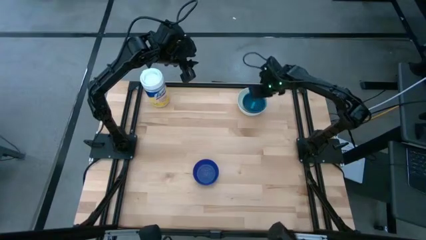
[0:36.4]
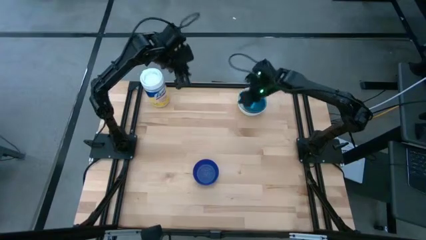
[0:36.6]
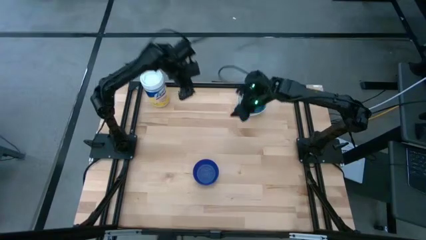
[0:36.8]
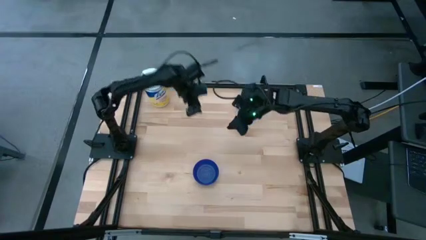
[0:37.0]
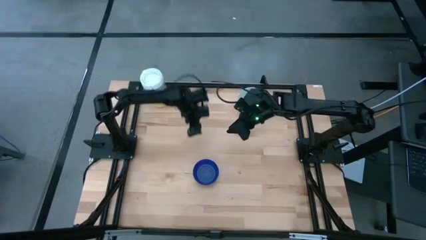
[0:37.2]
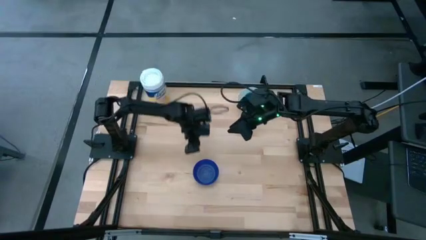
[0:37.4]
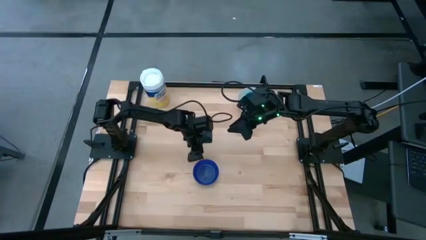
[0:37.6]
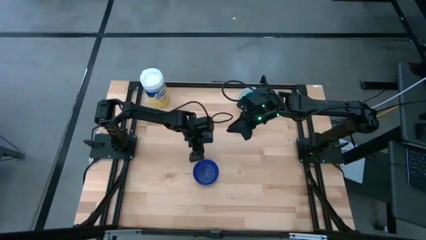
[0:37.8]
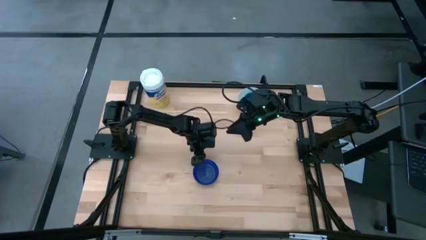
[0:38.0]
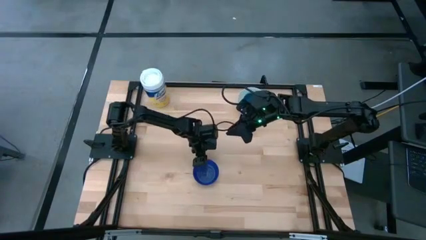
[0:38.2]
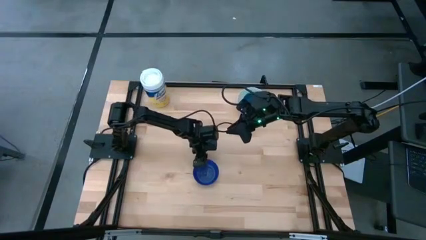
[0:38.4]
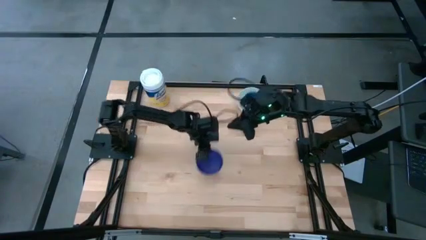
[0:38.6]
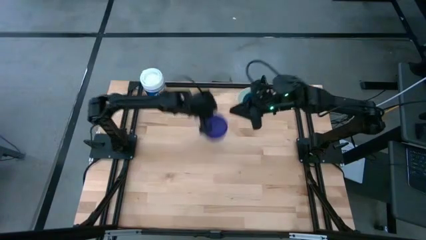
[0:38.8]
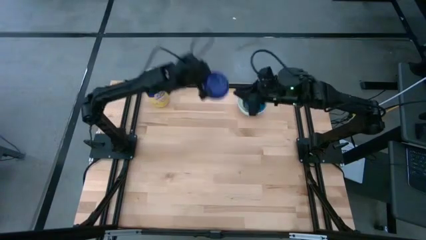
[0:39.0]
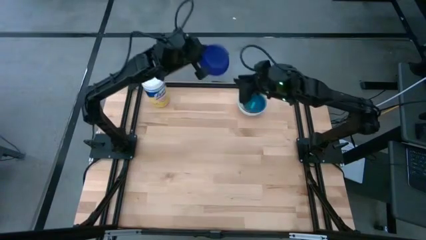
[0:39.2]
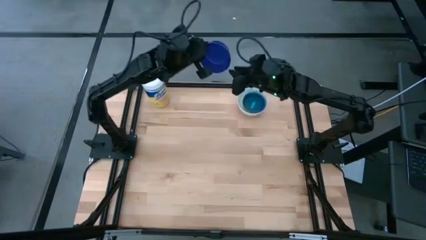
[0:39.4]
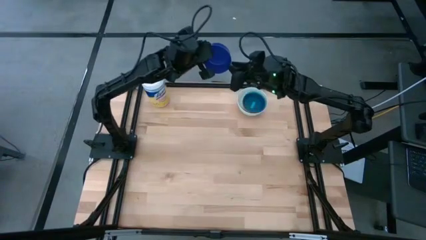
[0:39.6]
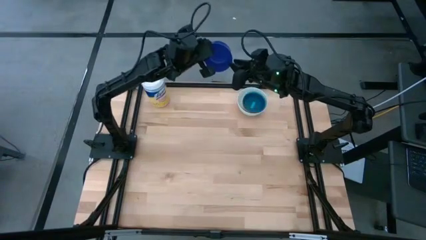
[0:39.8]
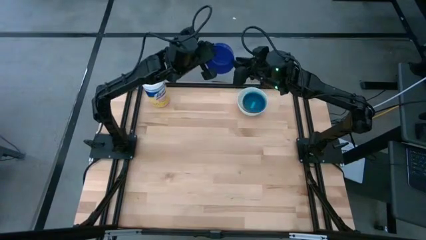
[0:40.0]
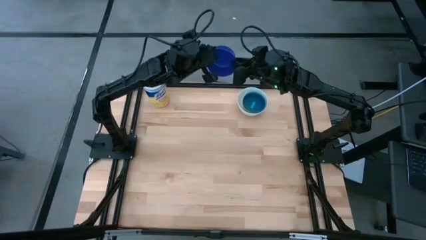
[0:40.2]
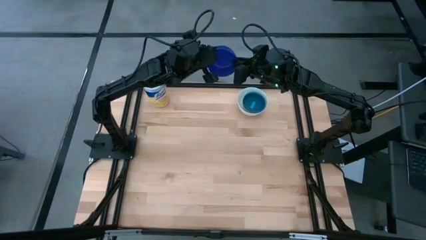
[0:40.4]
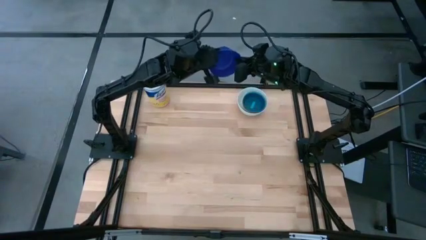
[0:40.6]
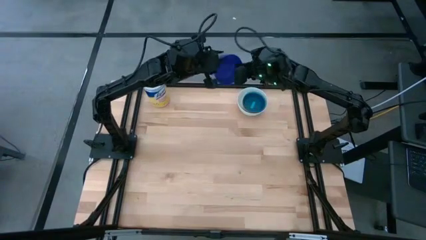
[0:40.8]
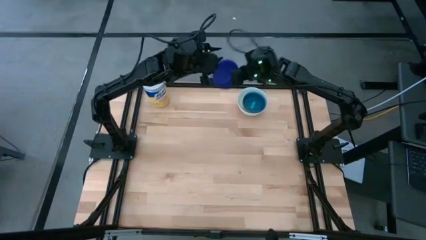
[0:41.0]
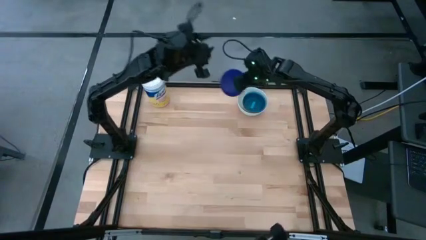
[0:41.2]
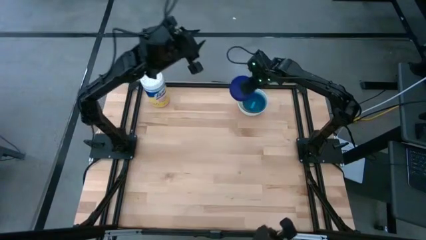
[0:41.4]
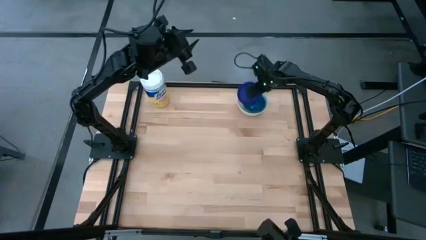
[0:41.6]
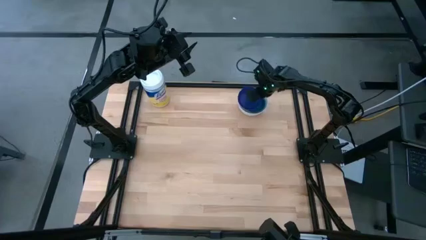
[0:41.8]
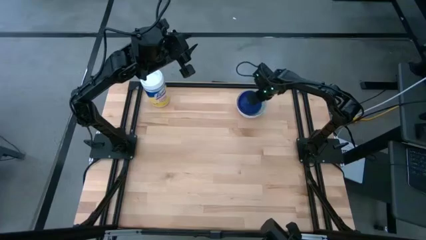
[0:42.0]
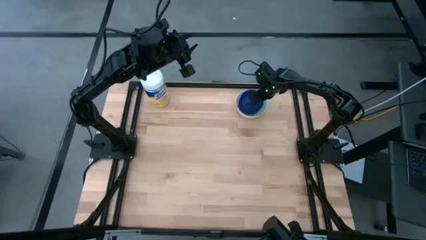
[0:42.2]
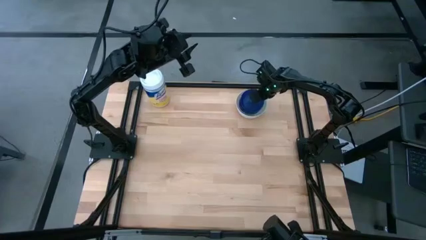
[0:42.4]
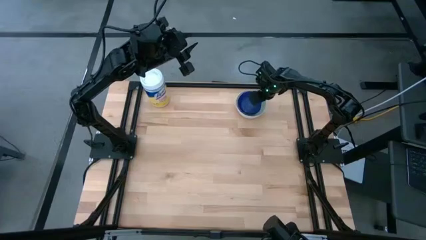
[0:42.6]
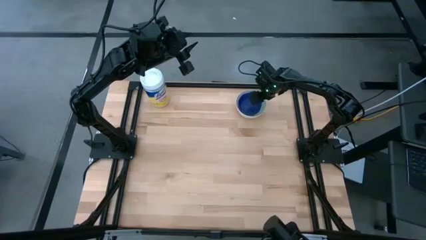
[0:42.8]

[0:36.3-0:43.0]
Stack the blue bowl on the light blue bowl

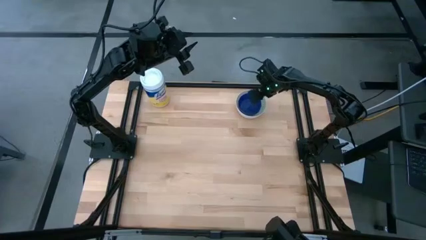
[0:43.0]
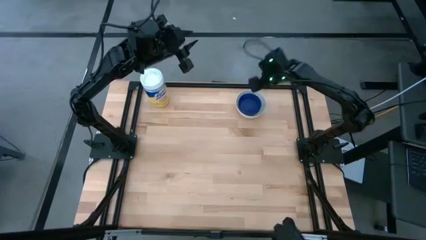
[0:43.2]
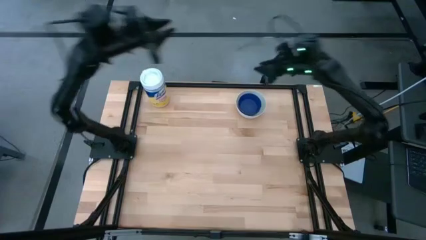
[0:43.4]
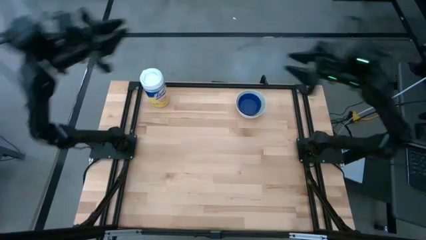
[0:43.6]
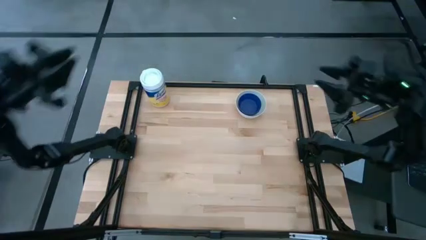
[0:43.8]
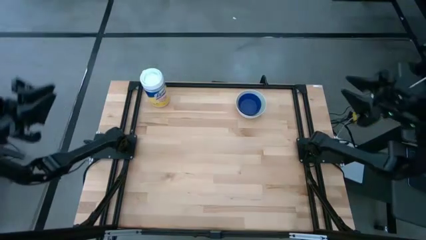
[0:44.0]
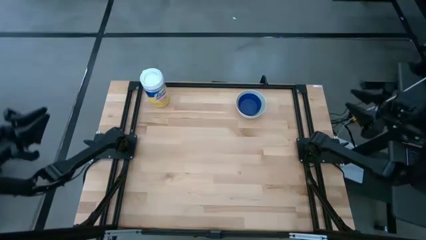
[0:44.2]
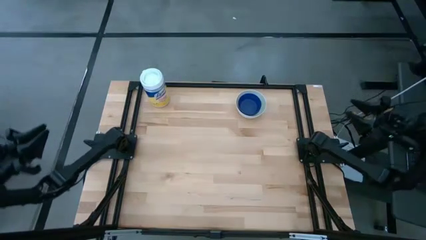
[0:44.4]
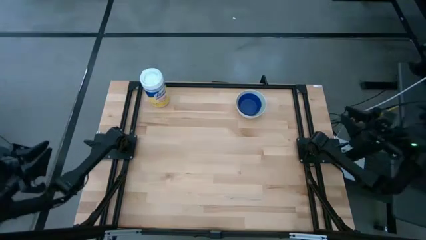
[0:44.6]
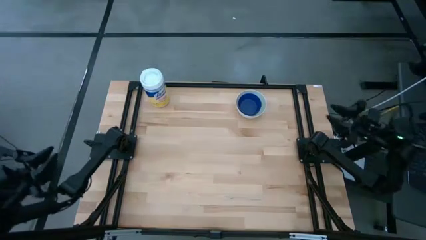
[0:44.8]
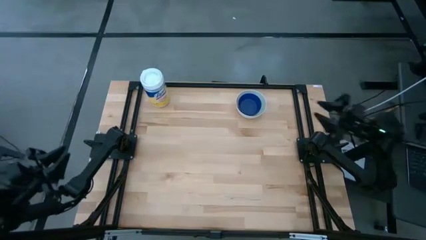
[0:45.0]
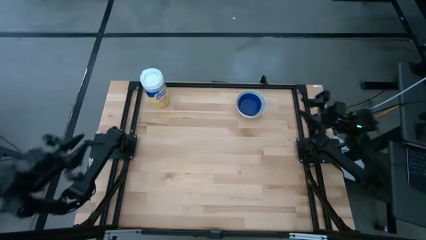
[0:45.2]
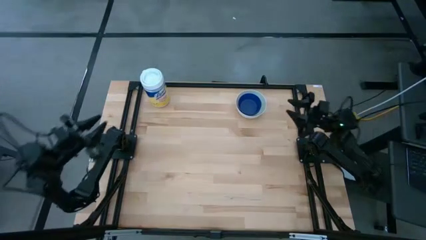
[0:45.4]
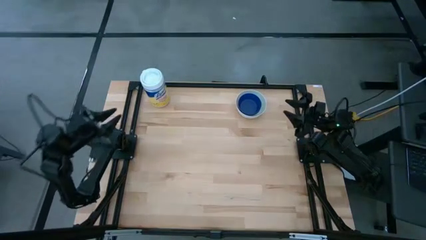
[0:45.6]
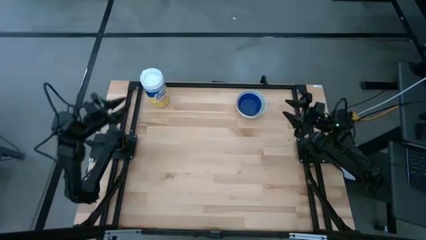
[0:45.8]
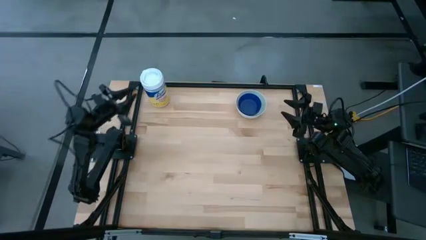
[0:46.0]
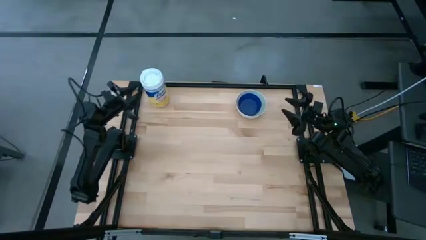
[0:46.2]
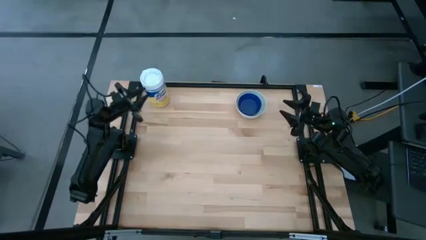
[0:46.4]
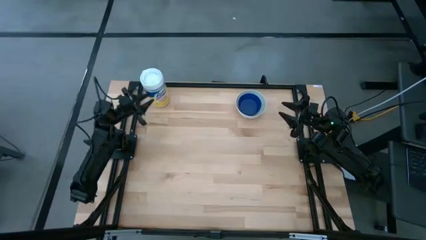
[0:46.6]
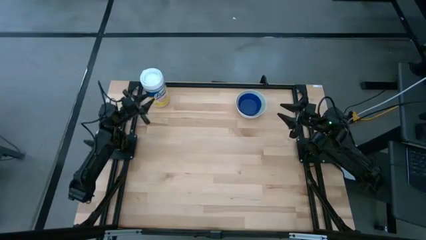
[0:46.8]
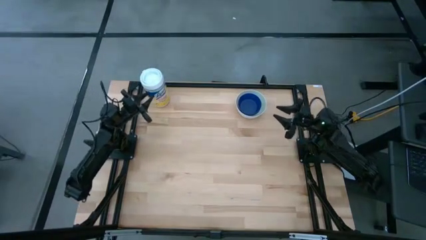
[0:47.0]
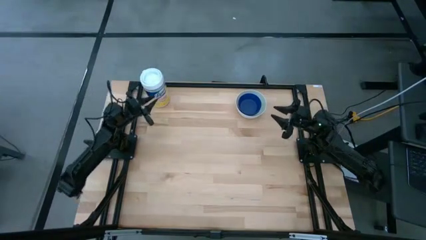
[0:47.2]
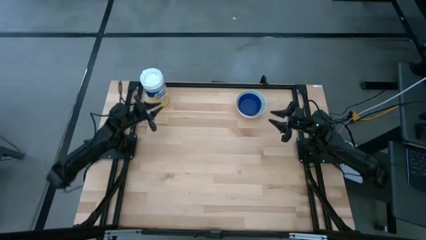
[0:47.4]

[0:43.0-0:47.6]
Return to Home Position
